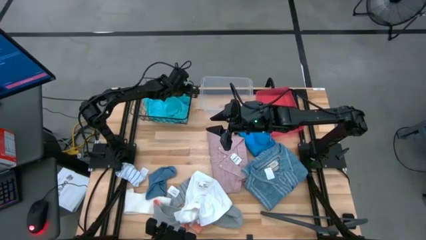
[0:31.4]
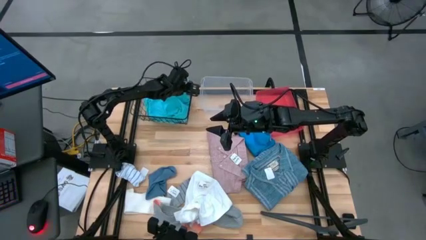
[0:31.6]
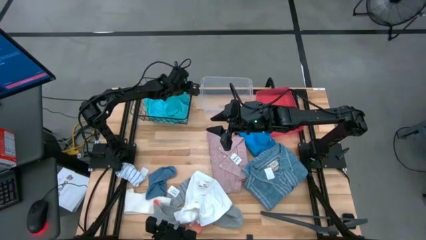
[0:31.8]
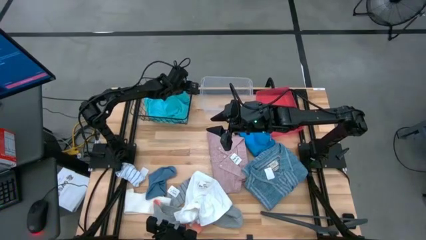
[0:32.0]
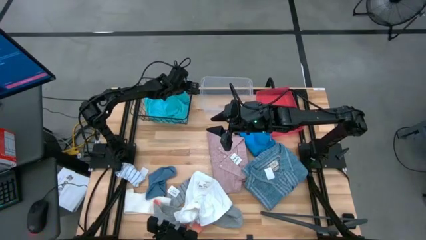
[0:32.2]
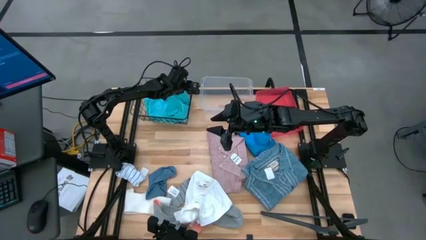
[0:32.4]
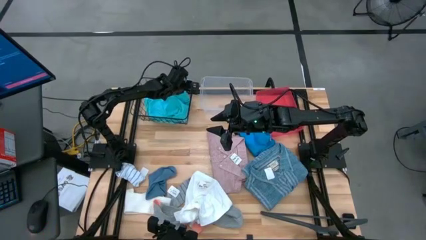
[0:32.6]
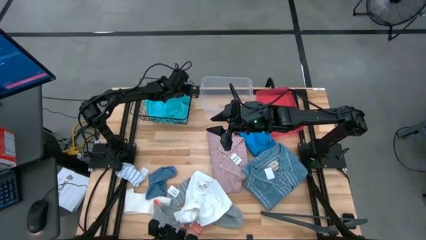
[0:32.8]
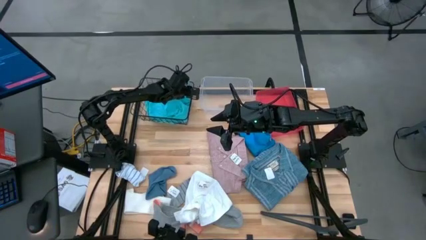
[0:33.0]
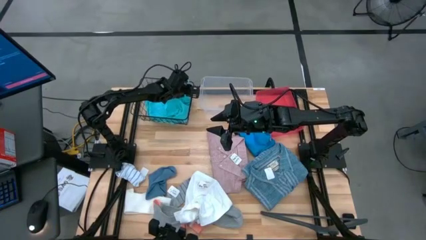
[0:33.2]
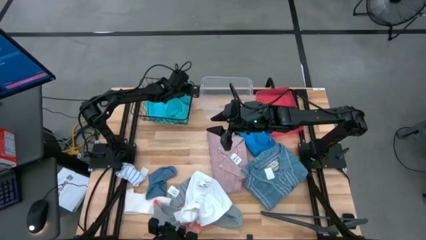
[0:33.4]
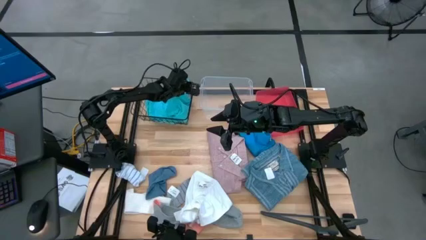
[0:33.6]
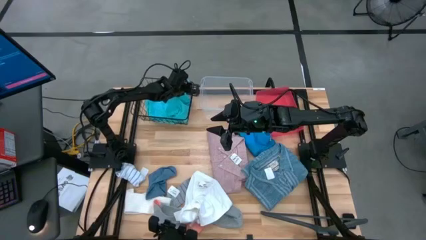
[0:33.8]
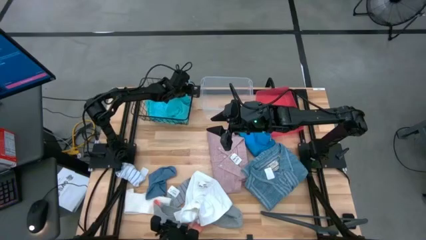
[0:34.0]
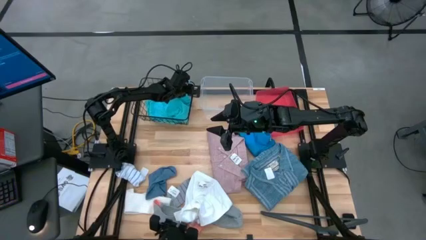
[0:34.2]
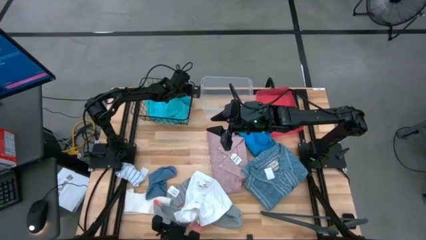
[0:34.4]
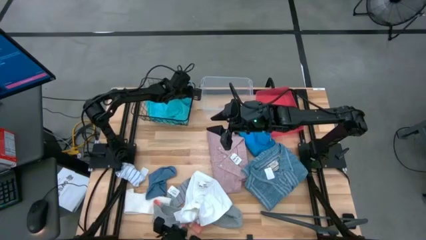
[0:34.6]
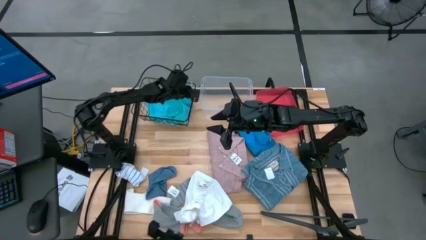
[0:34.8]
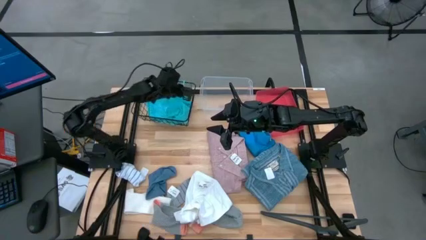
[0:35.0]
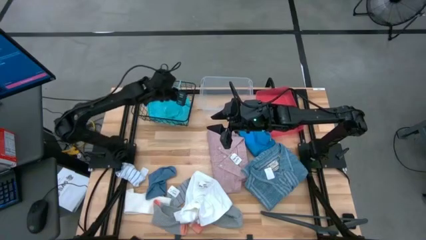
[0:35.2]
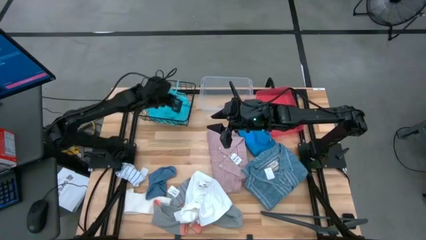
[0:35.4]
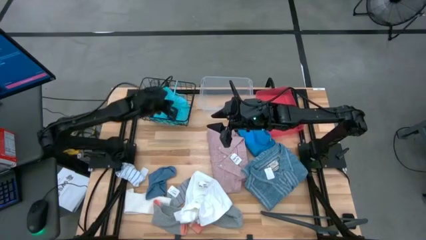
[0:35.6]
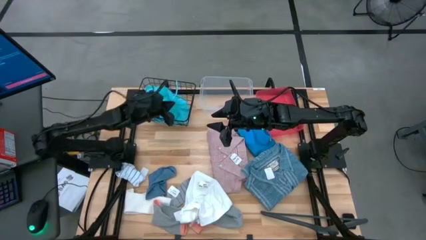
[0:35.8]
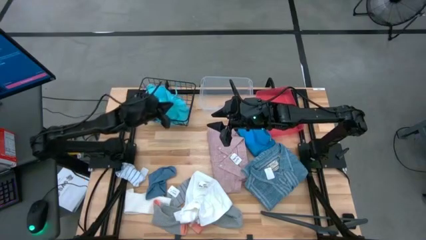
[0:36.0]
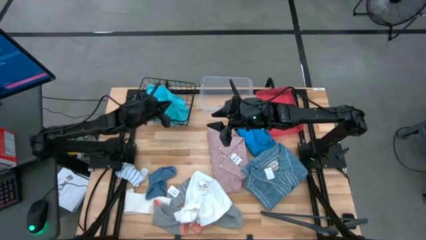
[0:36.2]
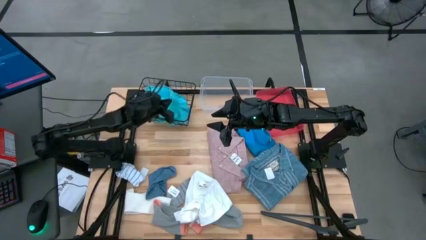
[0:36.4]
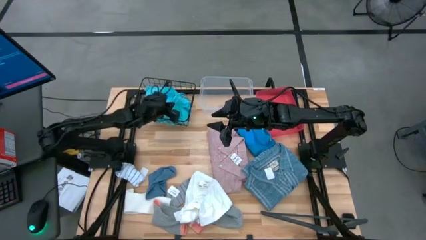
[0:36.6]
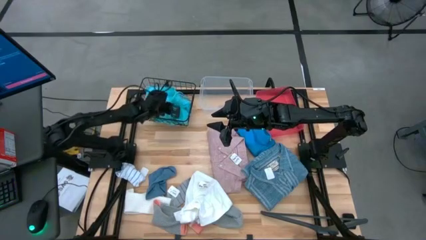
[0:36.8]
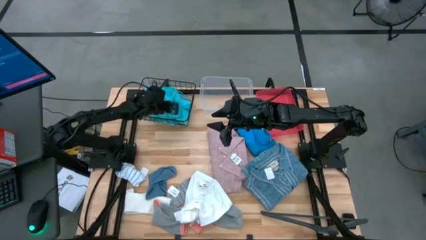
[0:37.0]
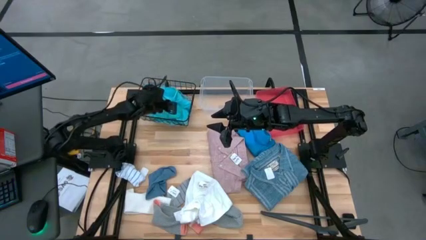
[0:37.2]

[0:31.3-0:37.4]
Task: Pick & Place Cloths
Put the light blue shorts into the black wire basket

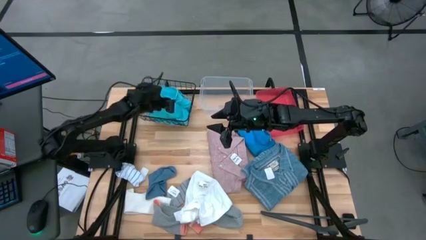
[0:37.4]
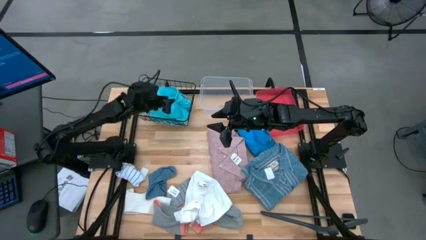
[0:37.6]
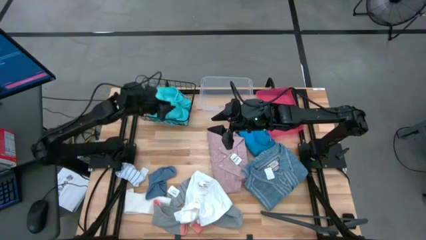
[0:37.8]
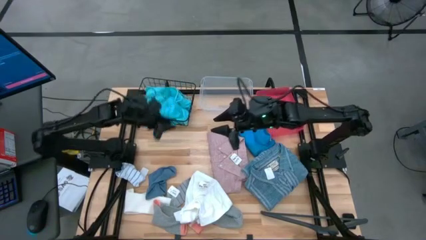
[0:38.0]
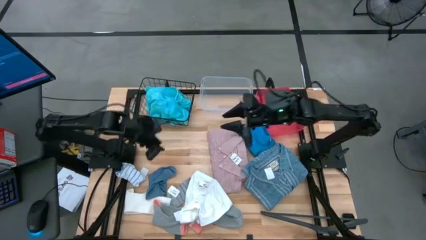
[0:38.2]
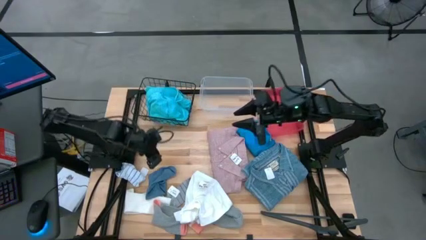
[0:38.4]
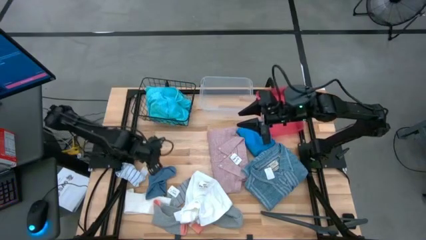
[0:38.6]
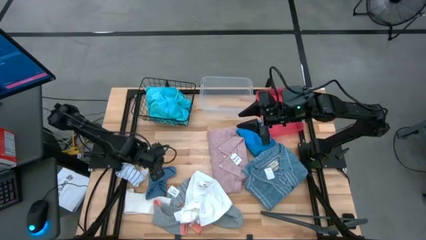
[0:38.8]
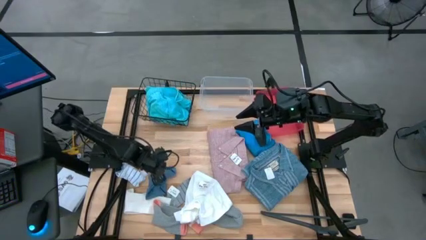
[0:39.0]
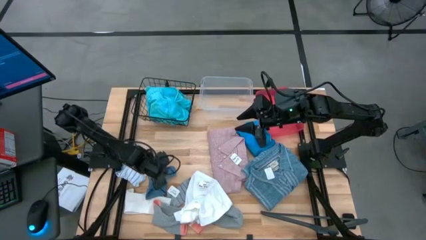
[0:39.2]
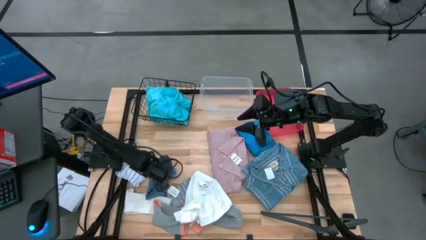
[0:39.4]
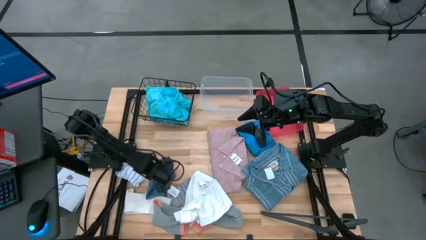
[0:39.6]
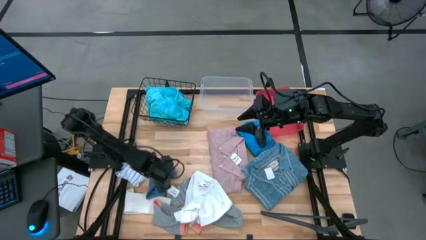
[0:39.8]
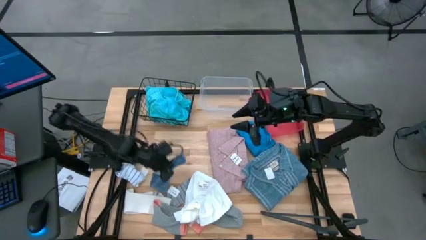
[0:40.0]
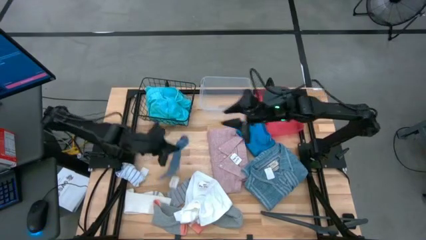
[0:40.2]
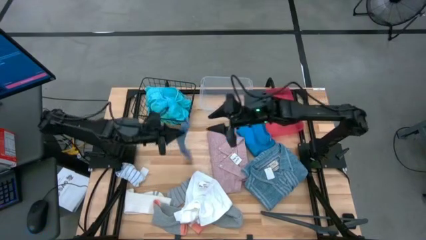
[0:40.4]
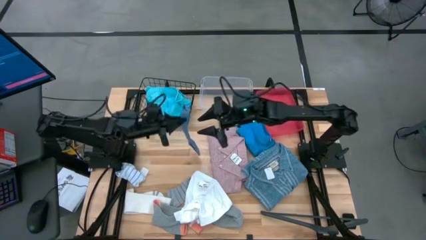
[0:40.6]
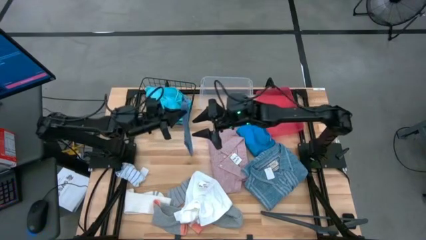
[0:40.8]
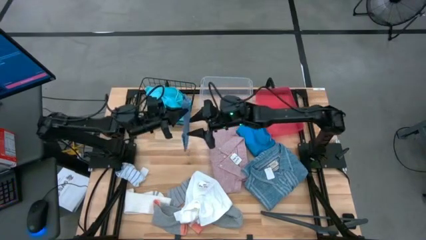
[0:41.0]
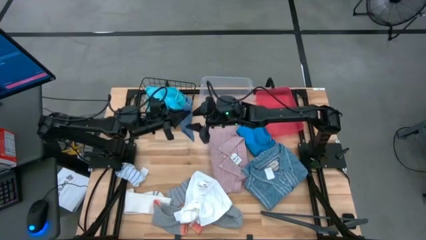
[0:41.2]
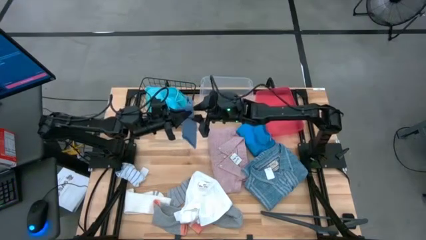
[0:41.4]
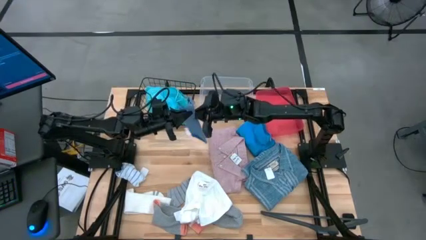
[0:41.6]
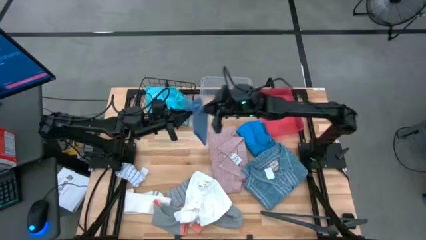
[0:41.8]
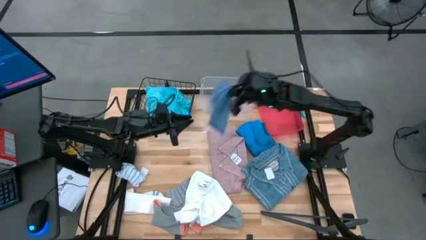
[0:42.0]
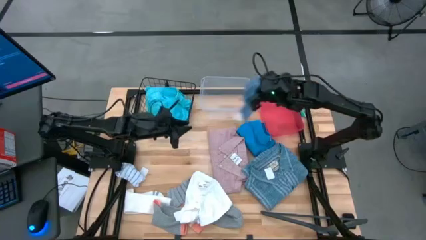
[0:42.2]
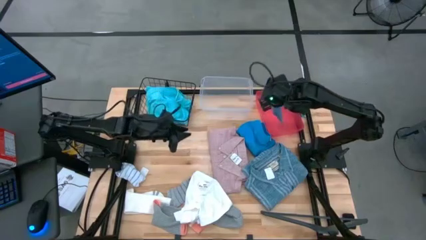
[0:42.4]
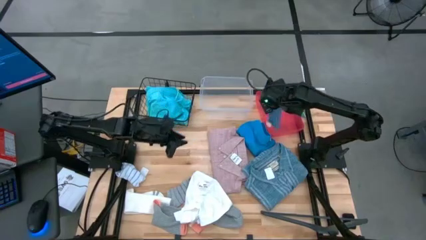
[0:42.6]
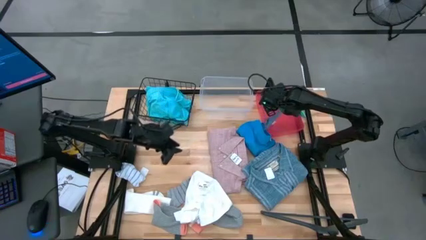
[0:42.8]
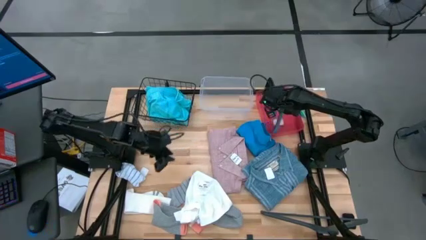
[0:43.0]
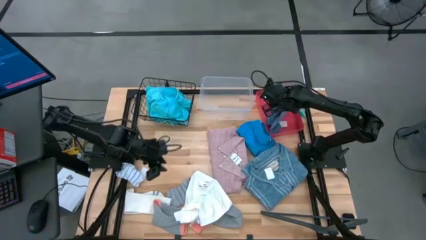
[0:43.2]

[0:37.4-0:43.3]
Put the blue sock into the red bin

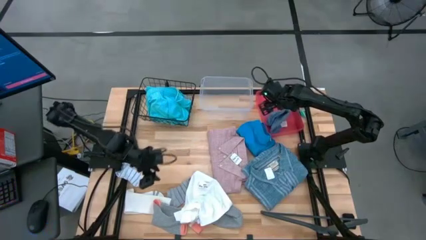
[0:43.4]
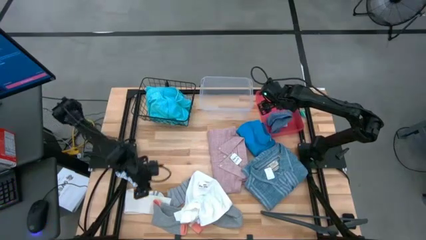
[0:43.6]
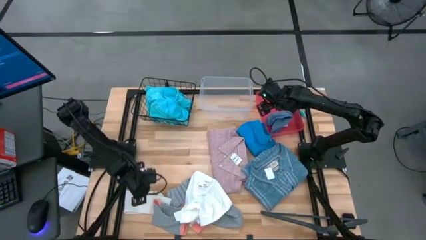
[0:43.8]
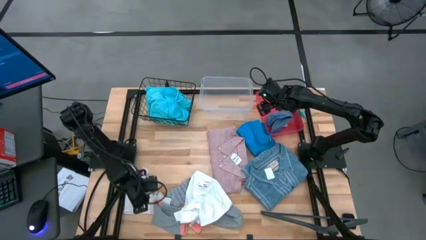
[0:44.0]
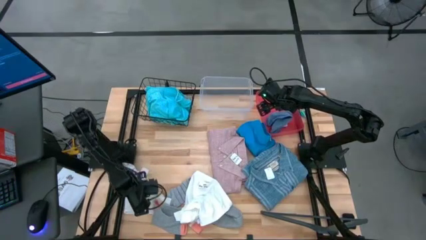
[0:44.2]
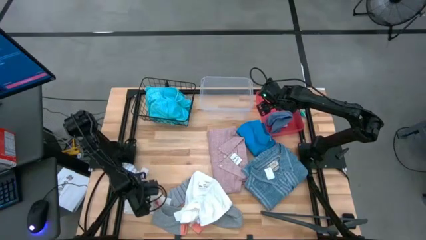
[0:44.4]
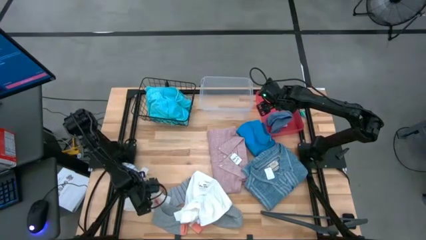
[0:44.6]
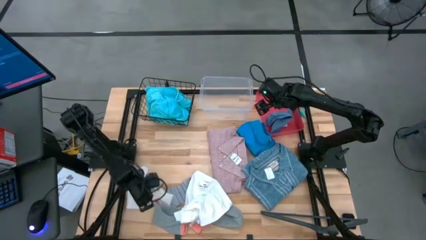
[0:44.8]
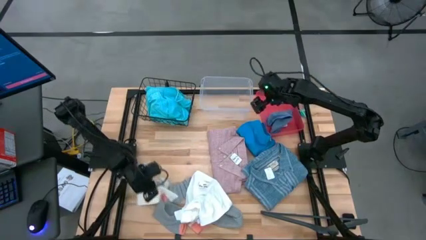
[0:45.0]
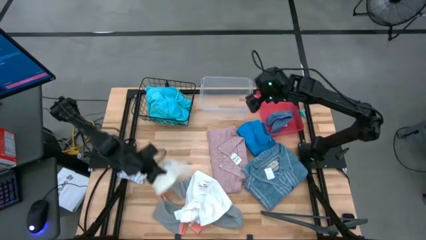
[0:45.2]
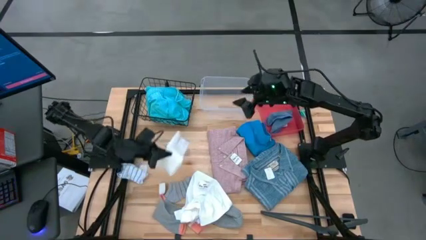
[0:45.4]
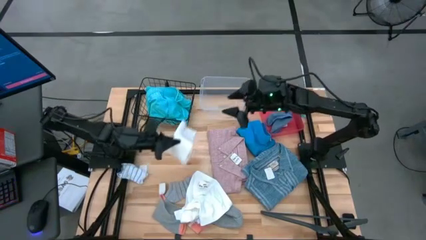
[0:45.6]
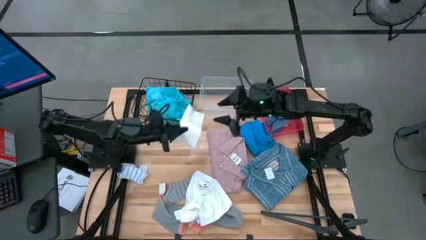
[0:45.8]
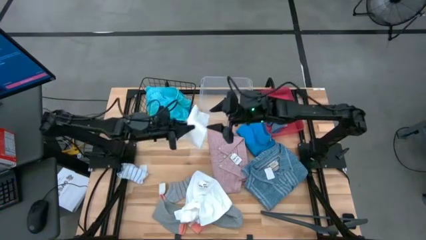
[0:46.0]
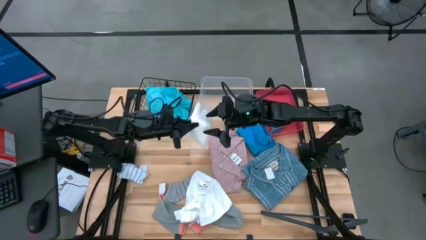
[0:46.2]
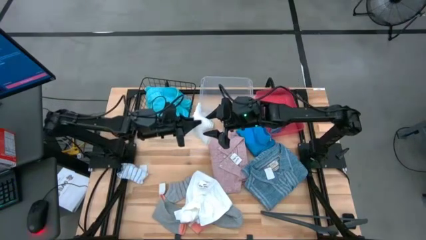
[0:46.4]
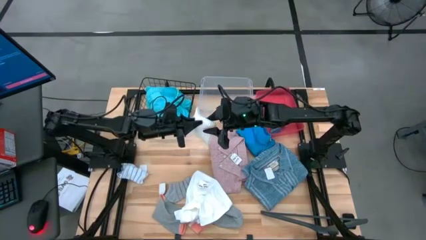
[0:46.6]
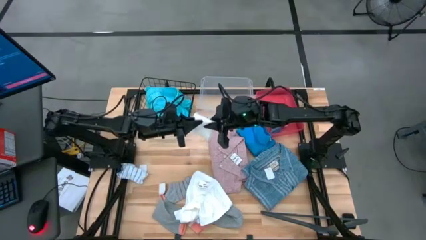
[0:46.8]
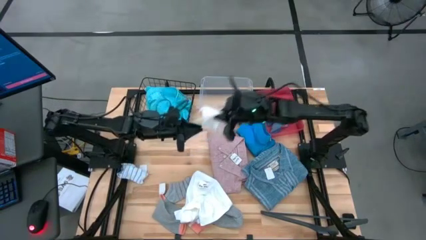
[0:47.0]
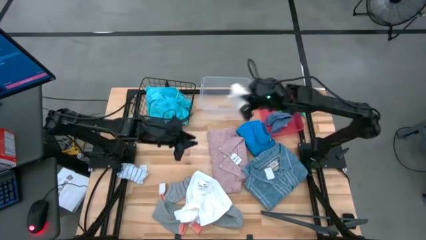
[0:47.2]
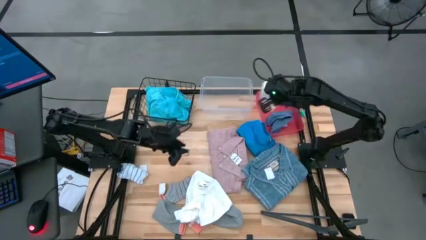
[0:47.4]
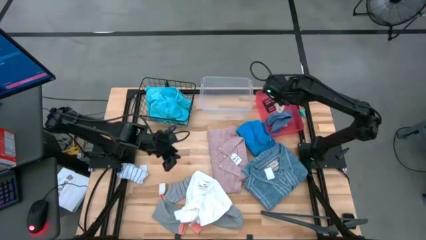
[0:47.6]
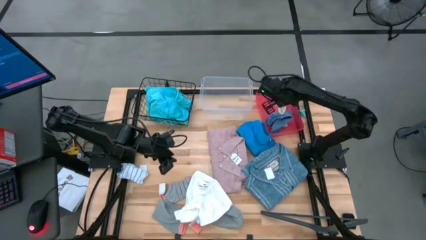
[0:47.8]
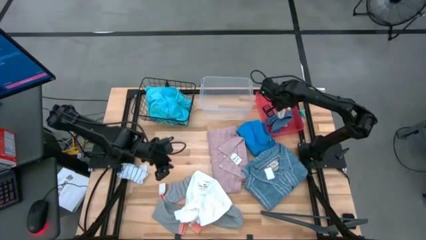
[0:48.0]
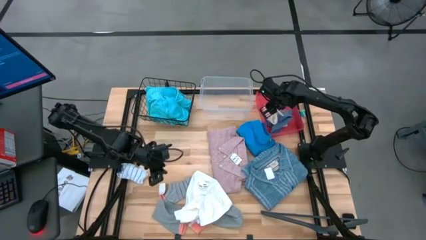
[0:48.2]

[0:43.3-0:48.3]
Put the white sock into the red bin
